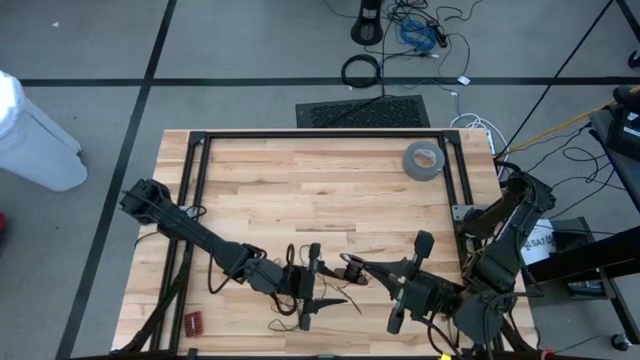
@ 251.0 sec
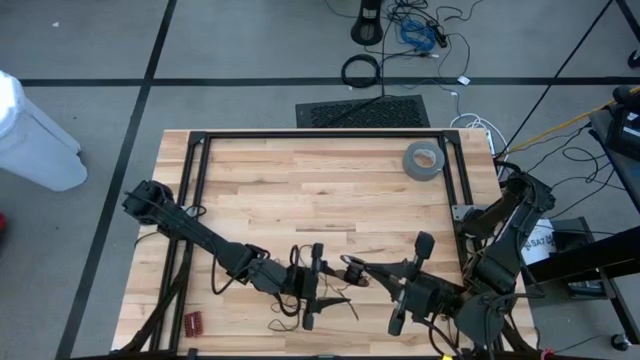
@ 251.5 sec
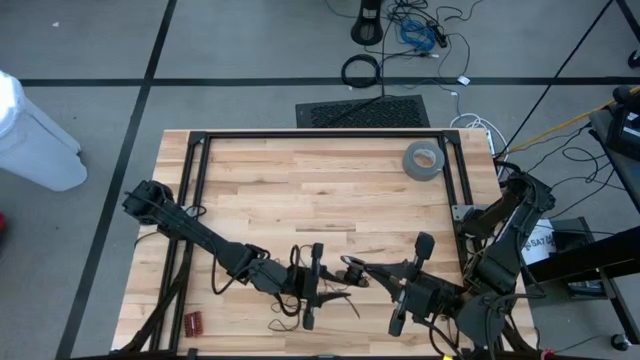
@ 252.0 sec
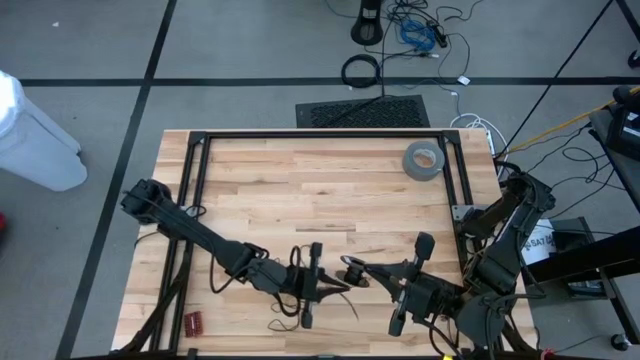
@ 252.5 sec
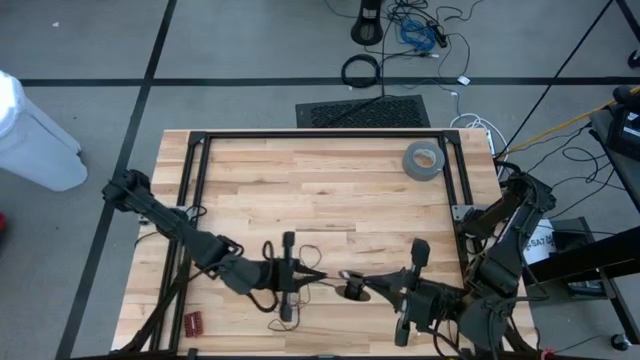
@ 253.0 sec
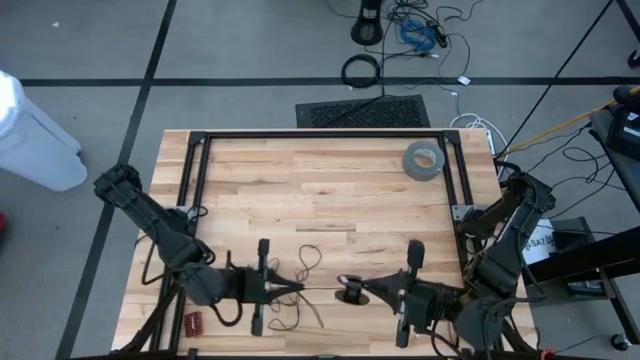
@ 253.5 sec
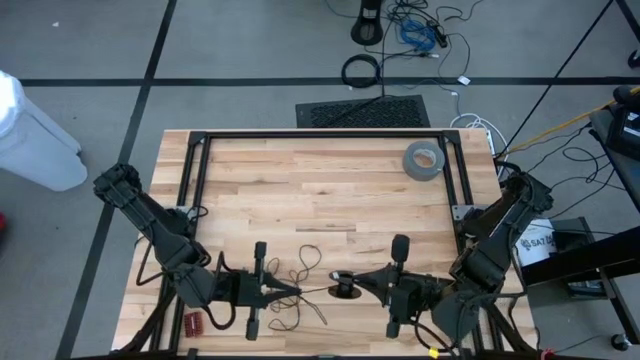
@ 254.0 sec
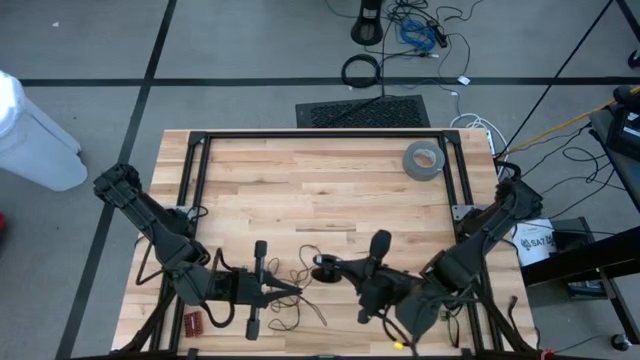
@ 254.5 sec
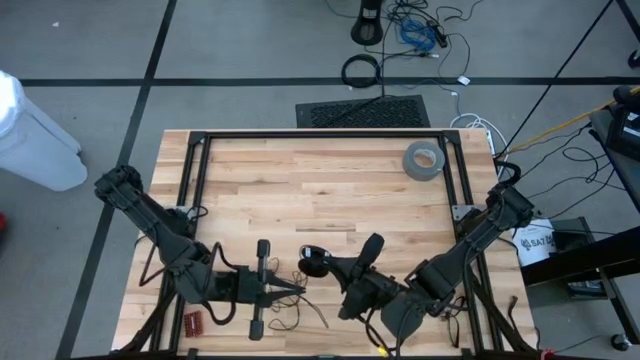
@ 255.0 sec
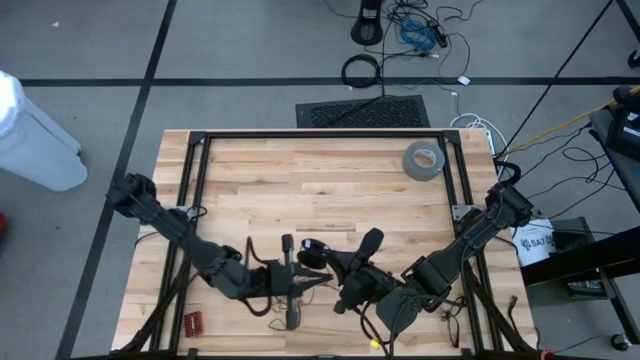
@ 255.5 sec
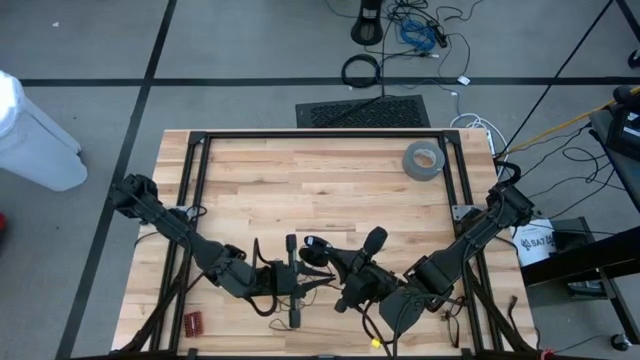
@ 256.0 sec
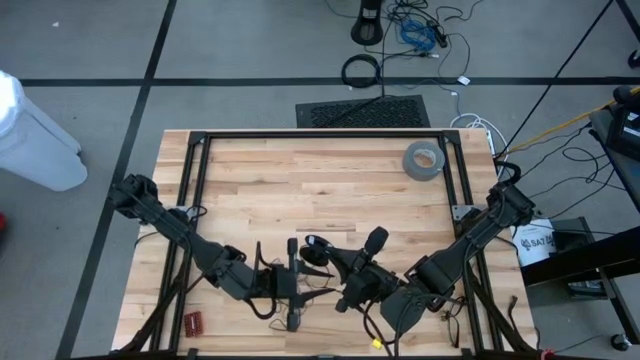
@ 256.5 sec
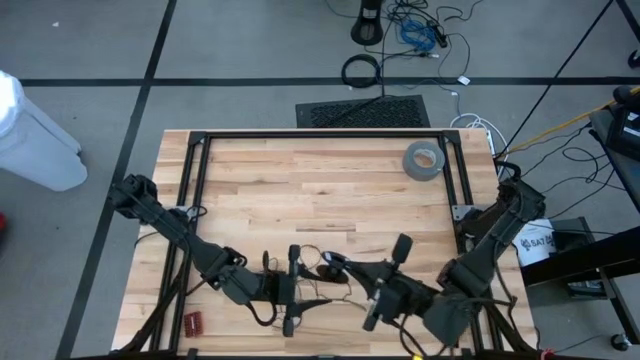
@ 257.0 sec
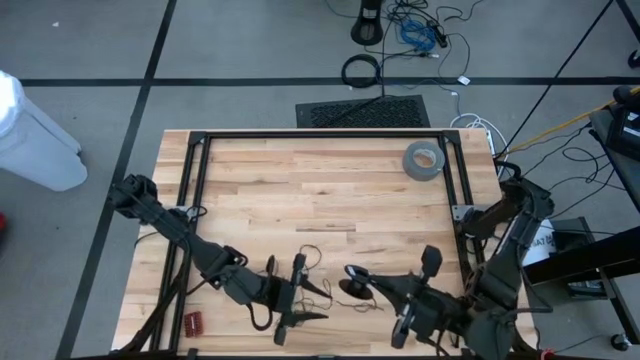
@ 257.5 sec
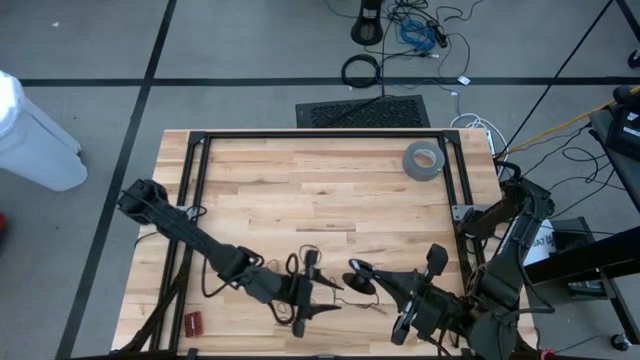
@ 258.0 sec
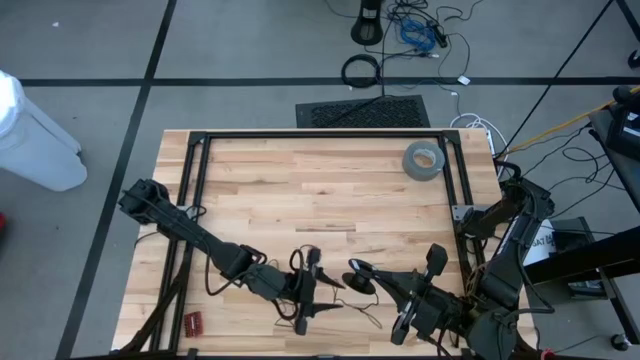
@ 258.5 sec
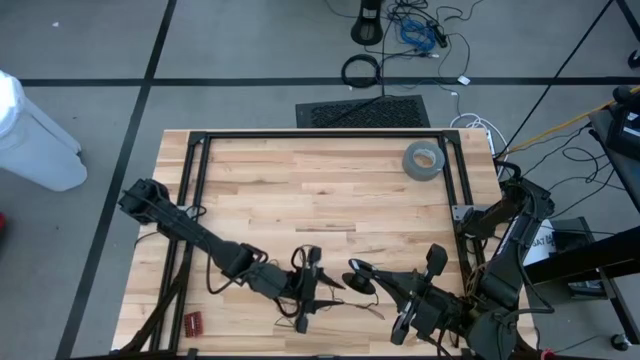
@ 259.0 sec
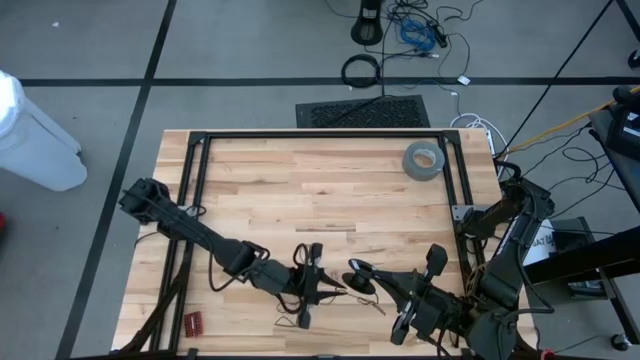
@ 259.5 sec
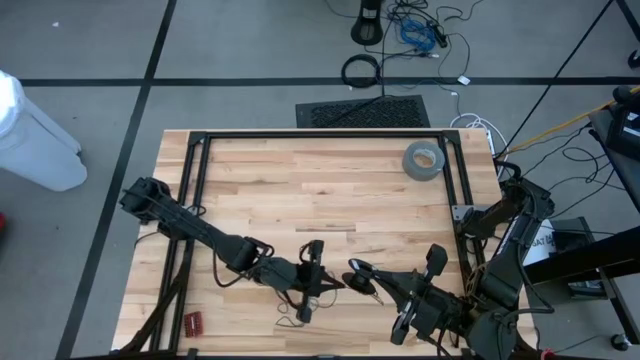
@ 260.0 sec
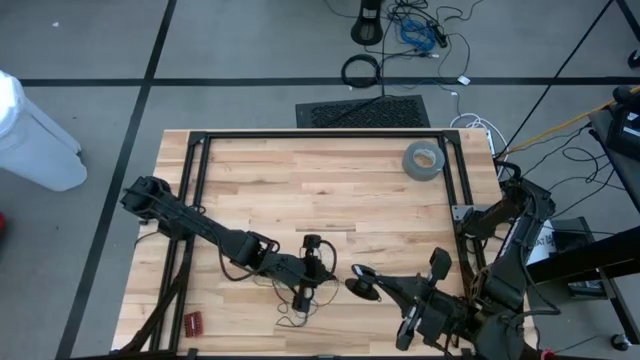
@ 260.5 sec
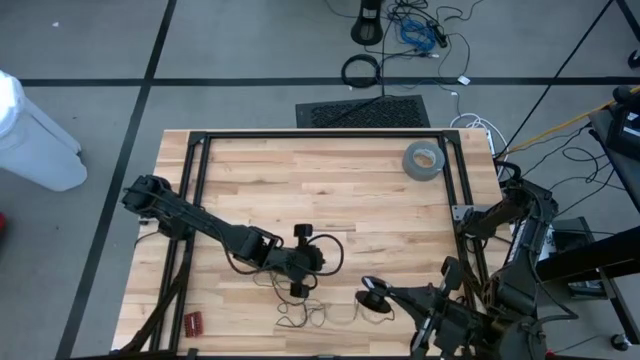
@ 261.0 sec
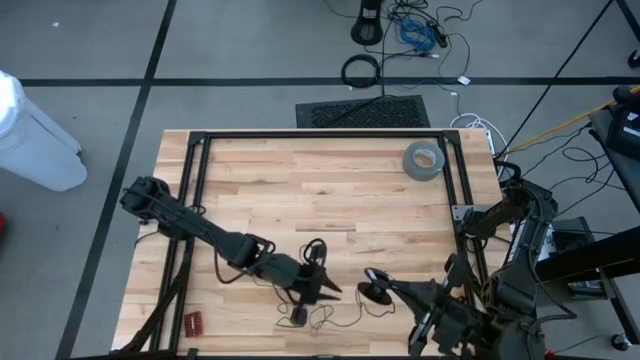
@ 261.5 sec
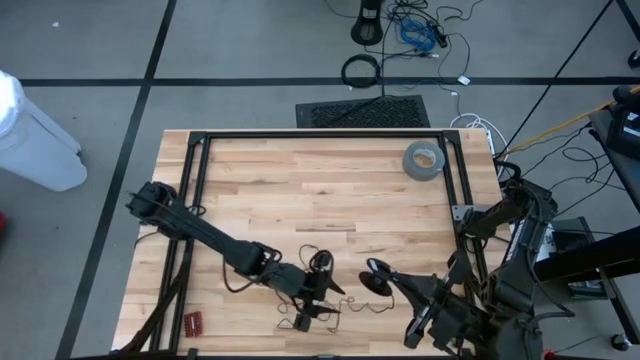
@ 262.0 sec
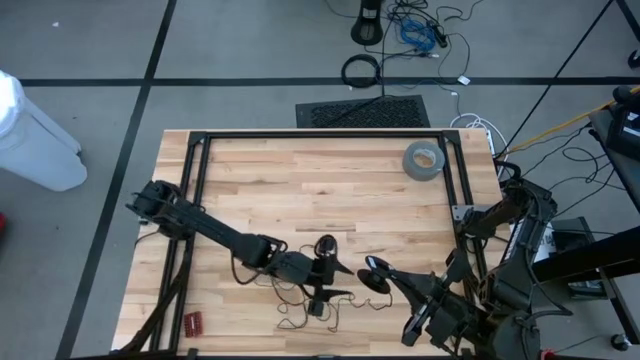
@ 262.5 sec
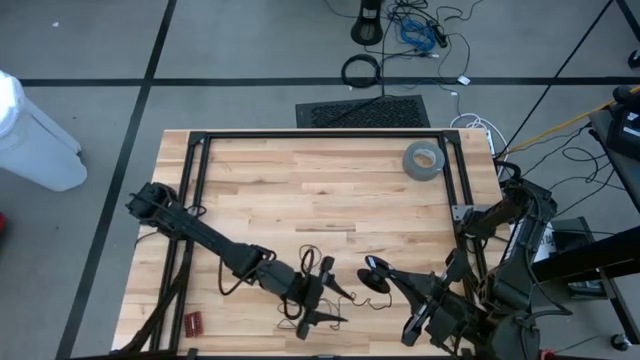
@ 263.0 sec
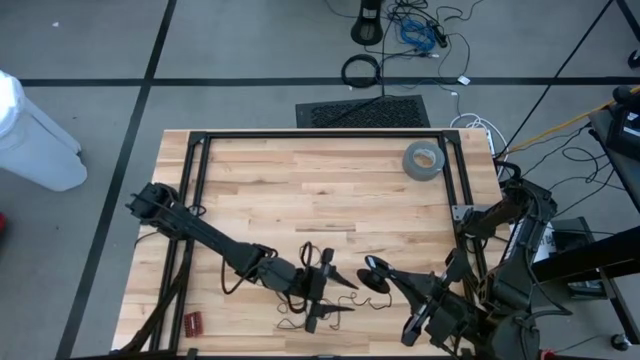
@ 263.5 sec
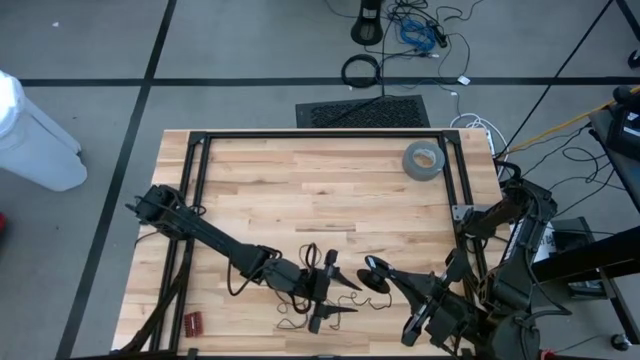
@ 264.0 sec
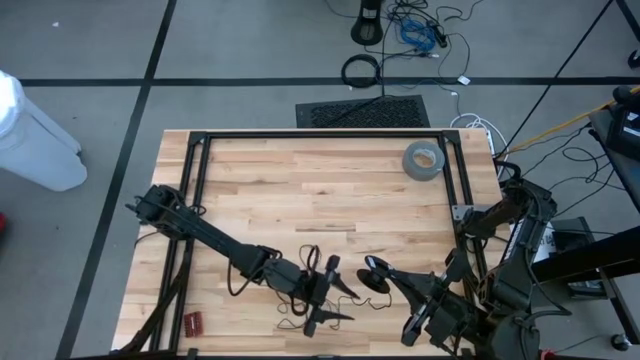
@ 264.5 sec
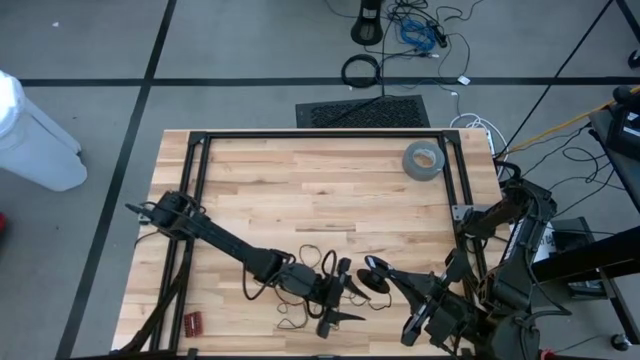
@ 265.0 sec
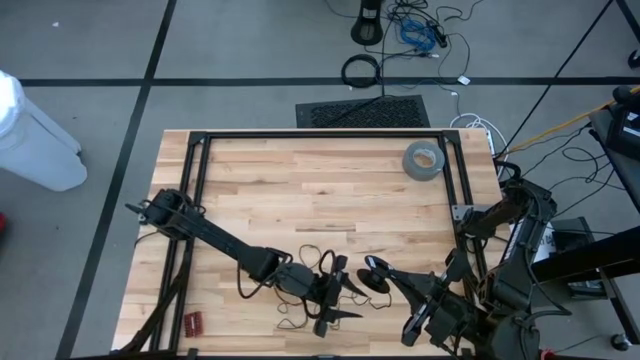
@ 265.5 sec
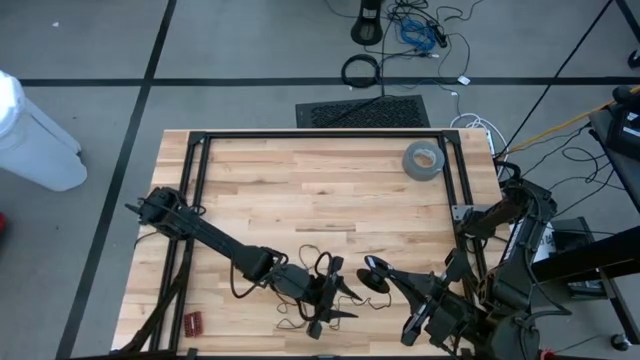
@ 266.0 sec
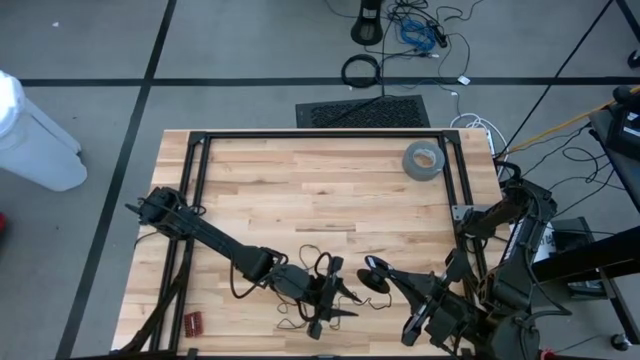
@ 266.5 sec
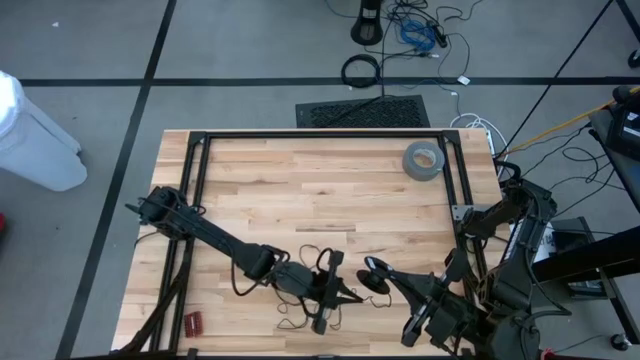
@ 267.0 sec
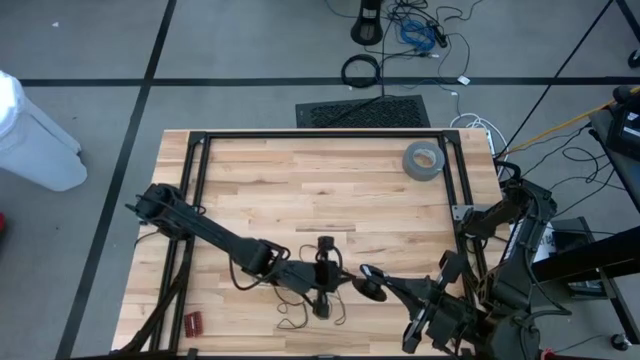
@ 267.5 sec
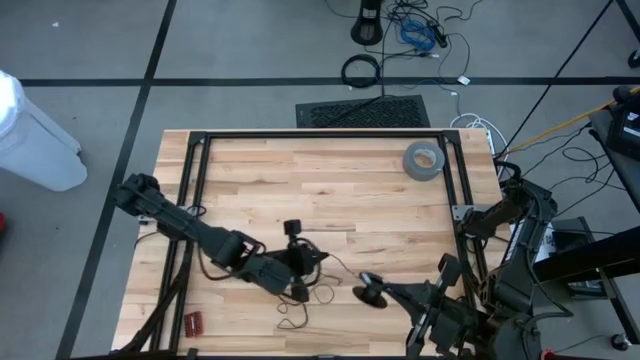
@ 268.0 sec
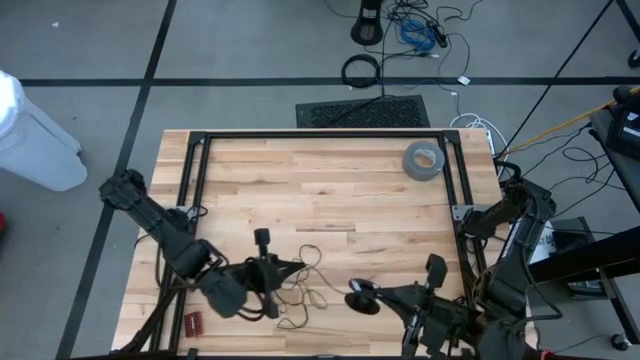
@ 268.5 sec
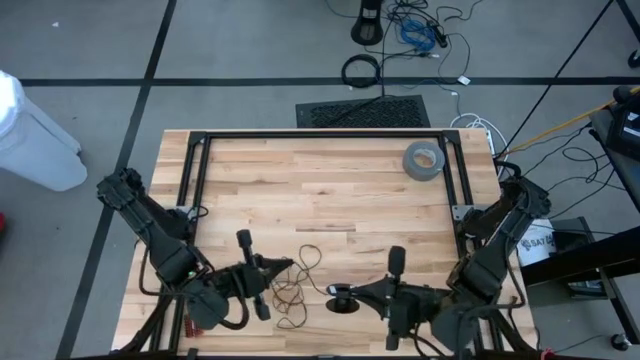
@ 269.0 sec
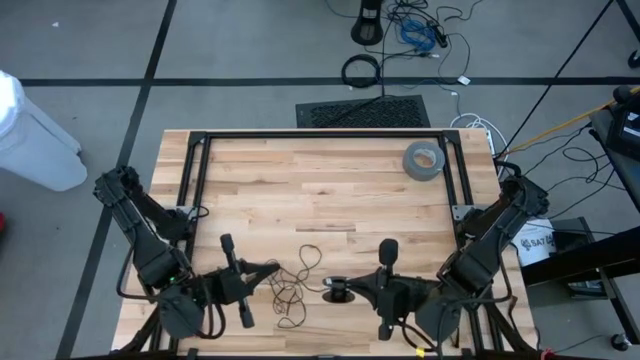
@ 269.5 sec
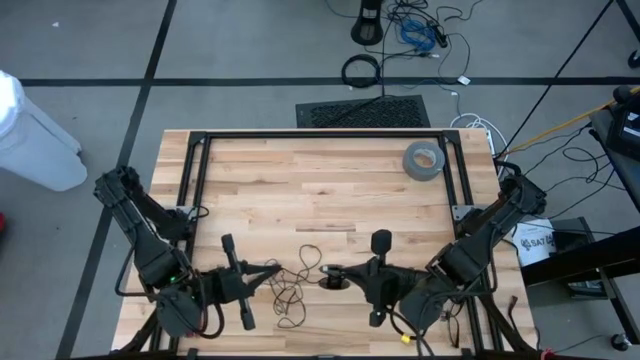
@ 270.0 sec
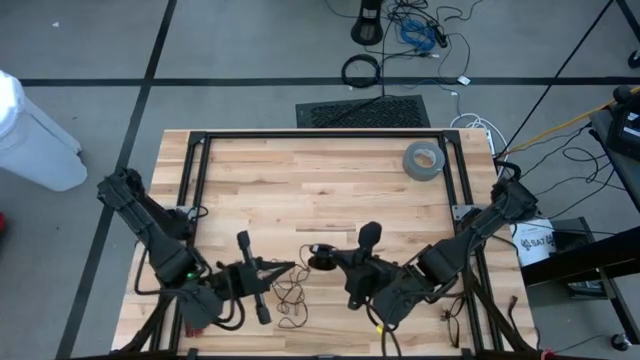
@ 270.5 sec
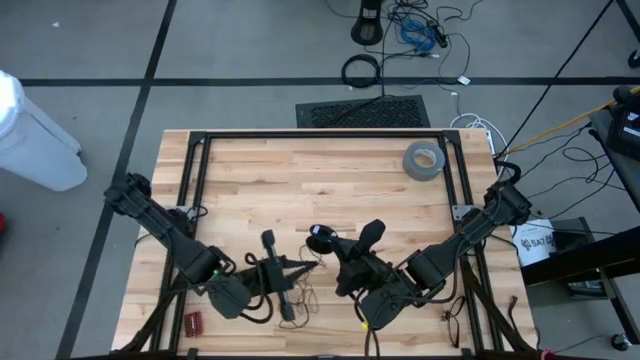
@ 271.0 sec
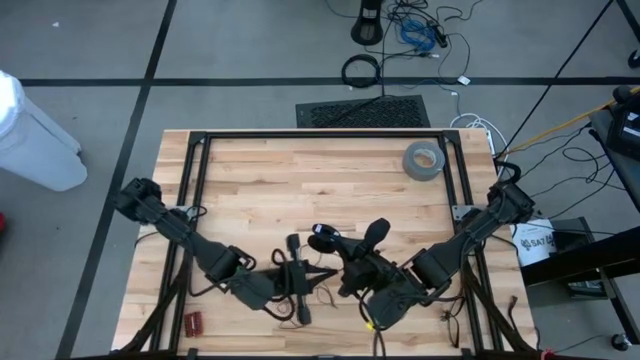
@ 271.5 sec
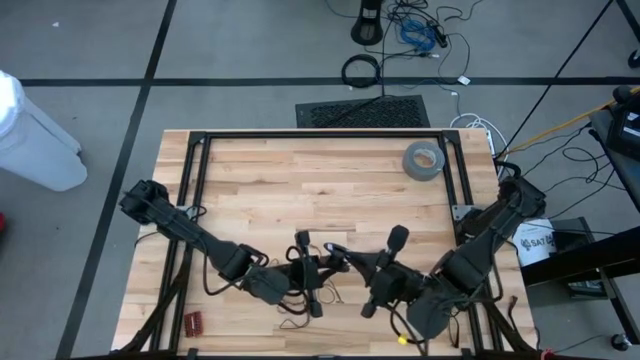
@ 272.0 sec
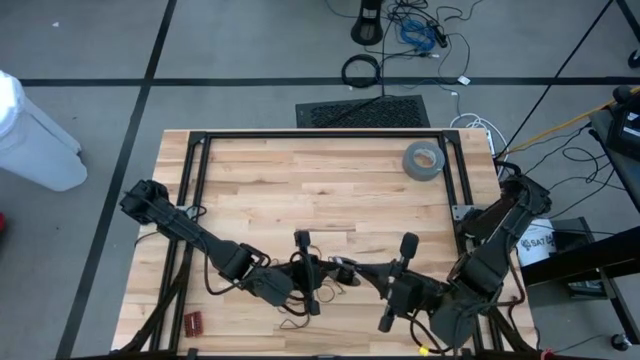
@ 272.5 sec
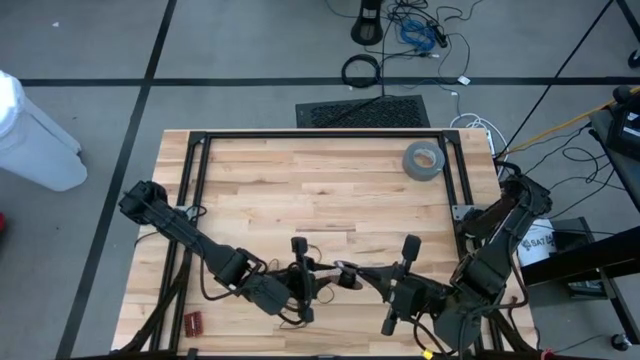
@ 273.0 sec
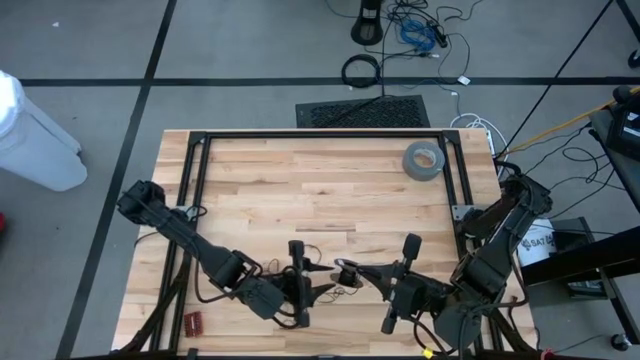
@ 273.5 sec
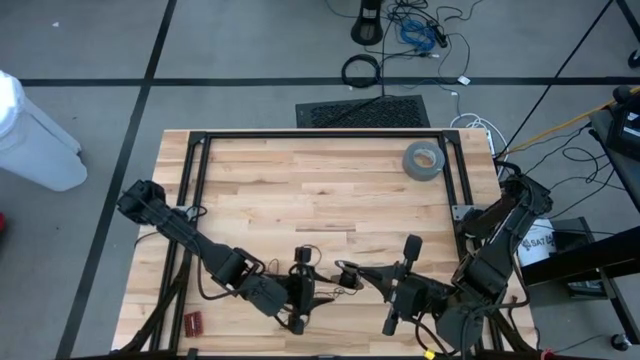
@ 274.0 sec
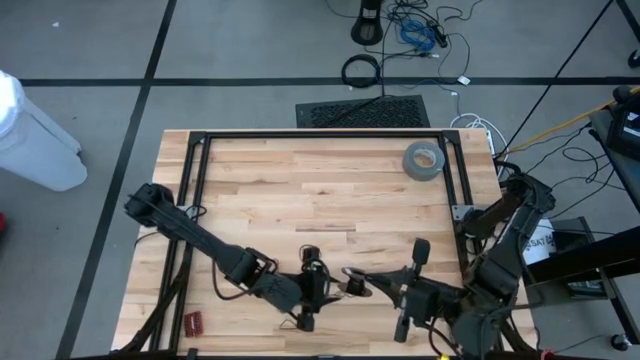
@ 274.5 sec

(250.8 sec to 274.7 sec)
Task: Coil cords
Coil the black wire onto the spool
